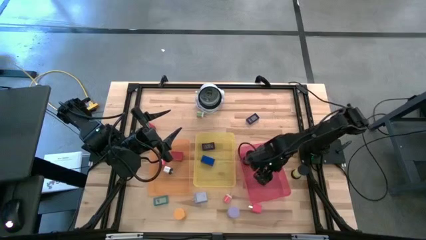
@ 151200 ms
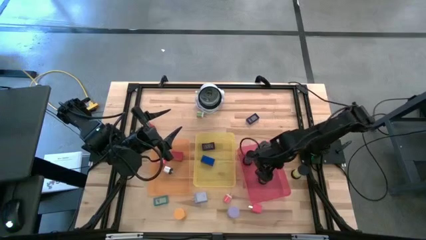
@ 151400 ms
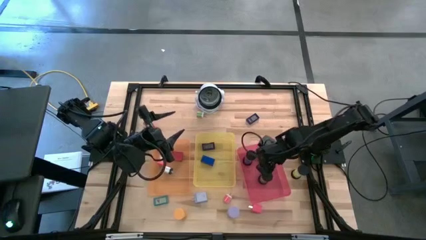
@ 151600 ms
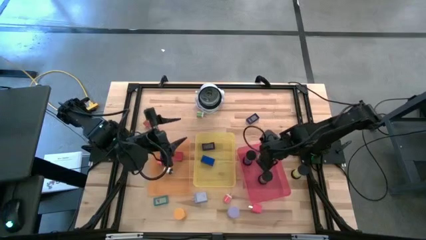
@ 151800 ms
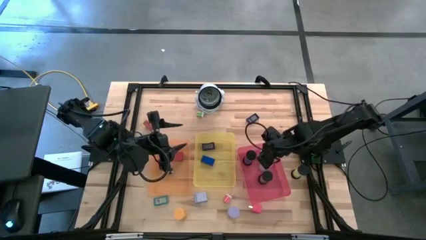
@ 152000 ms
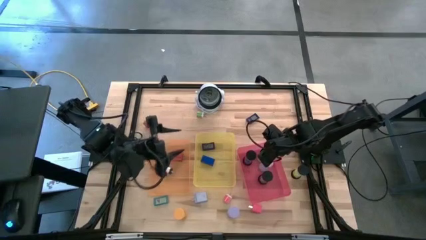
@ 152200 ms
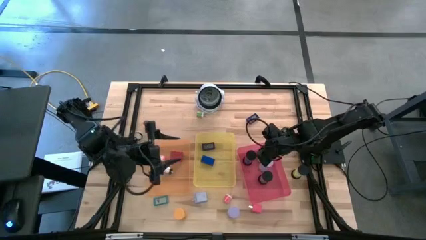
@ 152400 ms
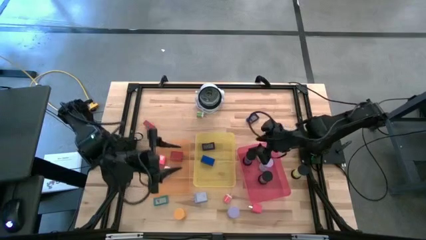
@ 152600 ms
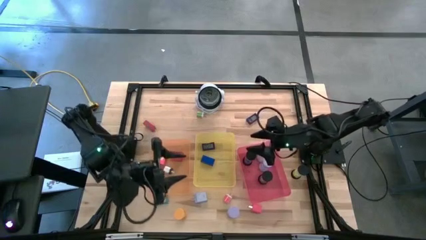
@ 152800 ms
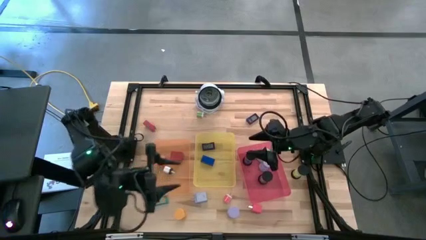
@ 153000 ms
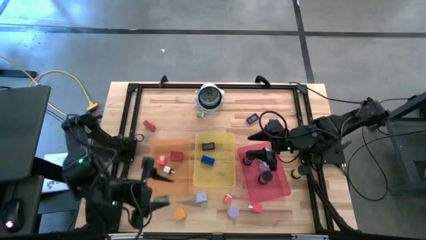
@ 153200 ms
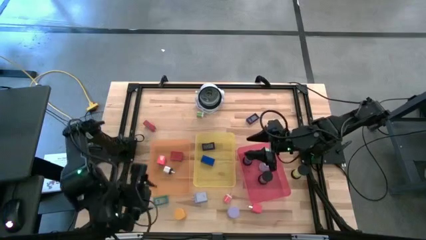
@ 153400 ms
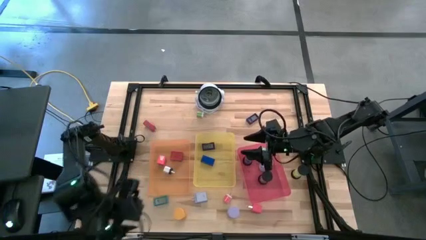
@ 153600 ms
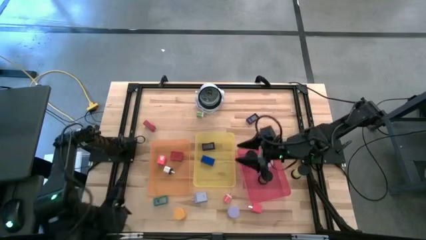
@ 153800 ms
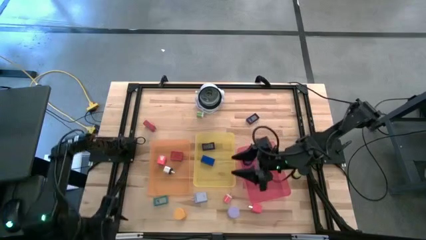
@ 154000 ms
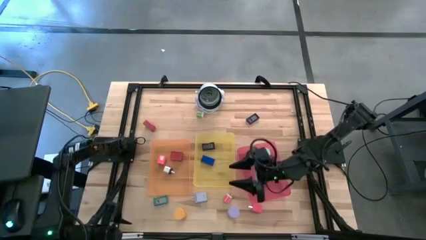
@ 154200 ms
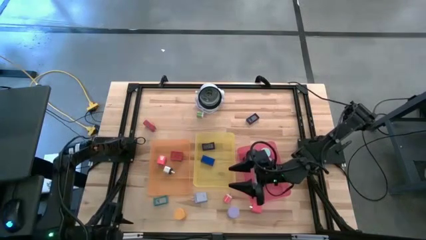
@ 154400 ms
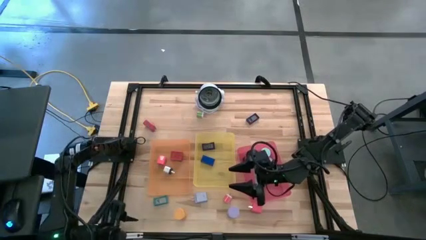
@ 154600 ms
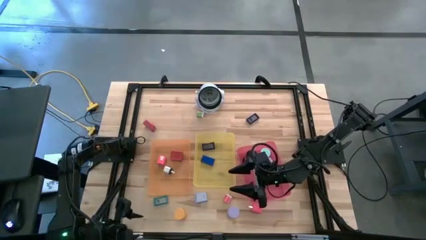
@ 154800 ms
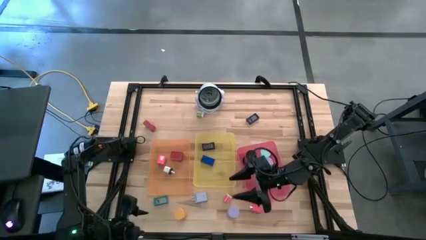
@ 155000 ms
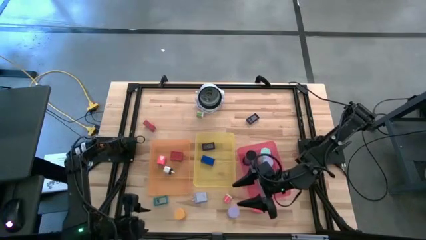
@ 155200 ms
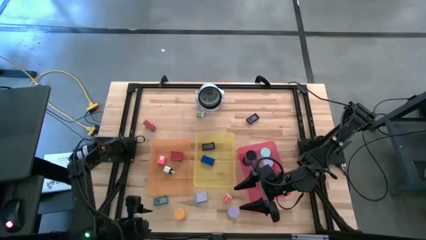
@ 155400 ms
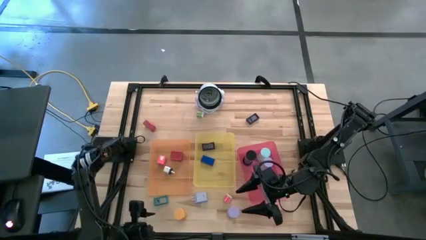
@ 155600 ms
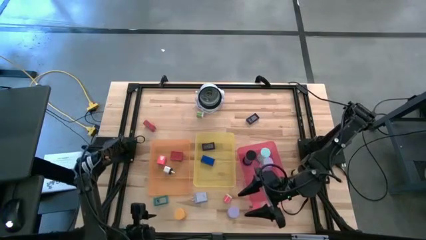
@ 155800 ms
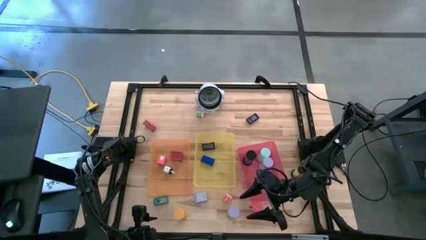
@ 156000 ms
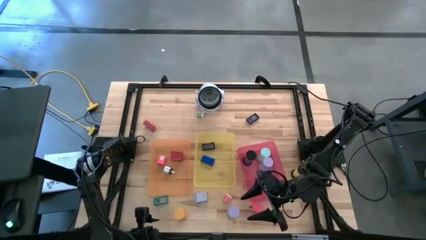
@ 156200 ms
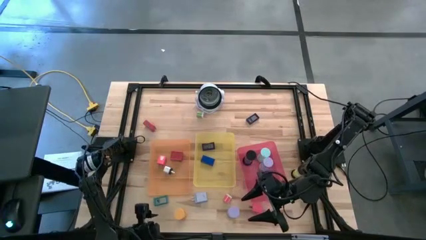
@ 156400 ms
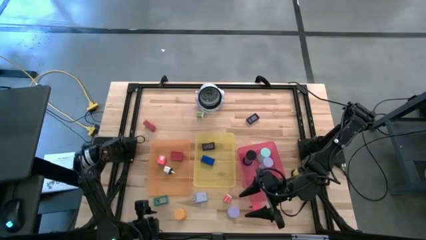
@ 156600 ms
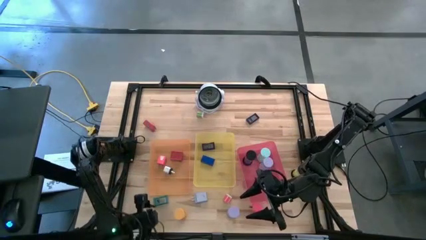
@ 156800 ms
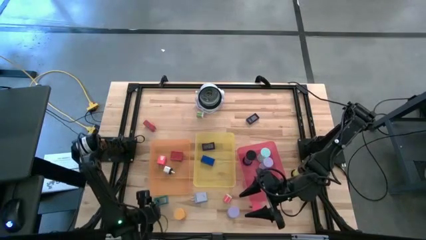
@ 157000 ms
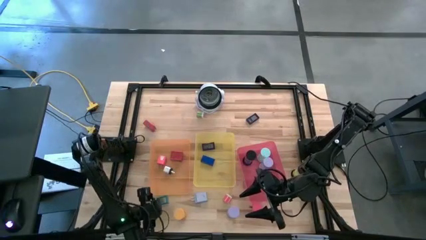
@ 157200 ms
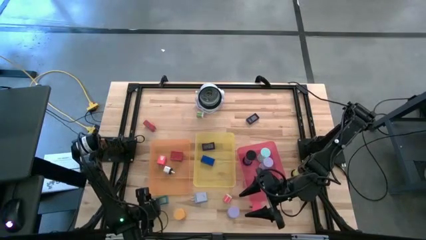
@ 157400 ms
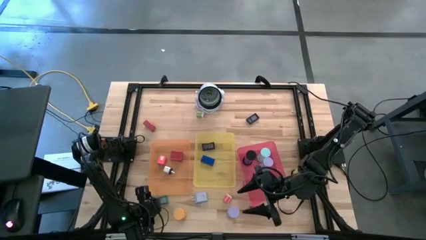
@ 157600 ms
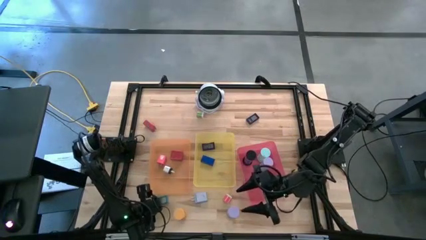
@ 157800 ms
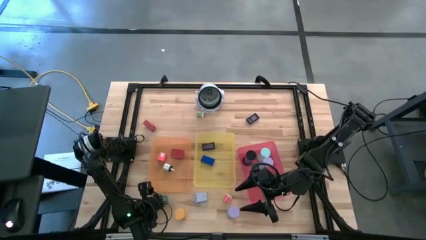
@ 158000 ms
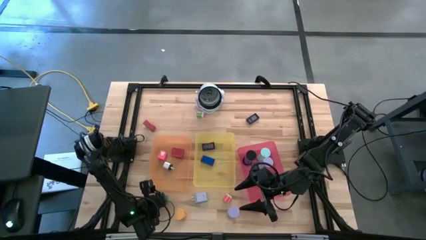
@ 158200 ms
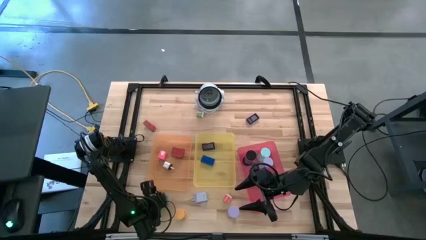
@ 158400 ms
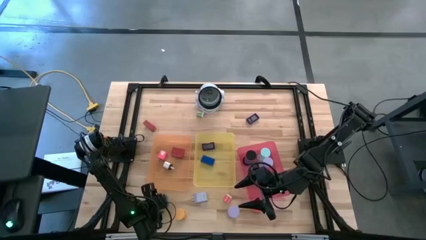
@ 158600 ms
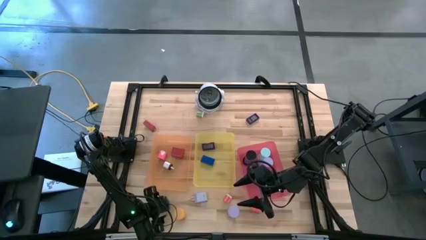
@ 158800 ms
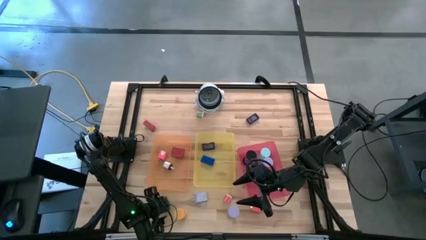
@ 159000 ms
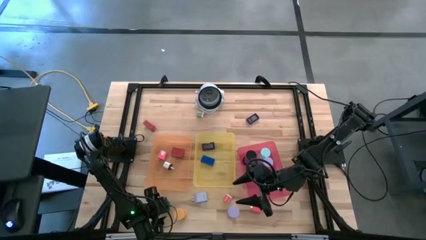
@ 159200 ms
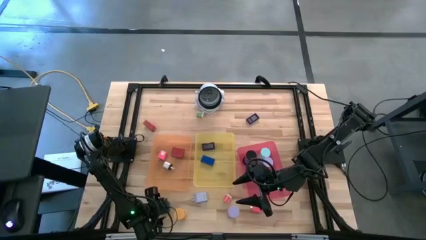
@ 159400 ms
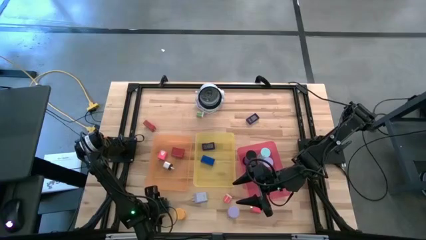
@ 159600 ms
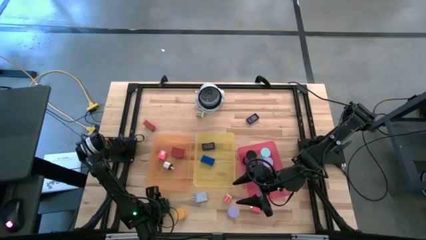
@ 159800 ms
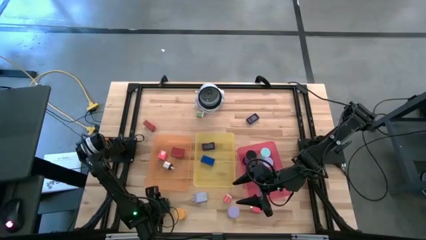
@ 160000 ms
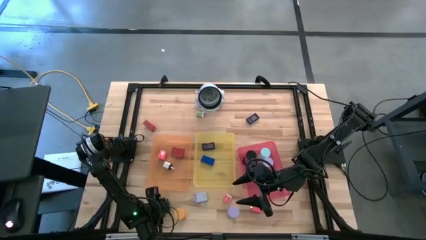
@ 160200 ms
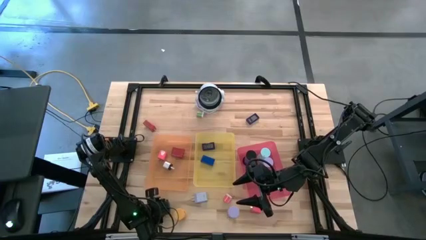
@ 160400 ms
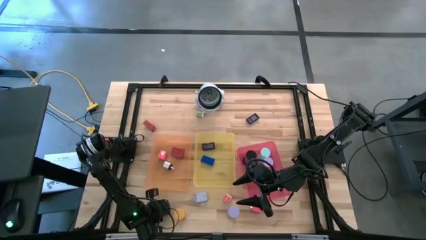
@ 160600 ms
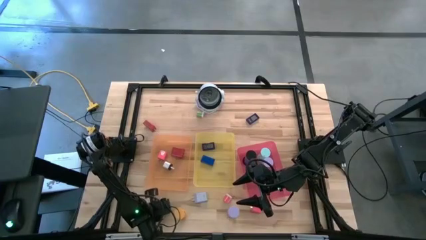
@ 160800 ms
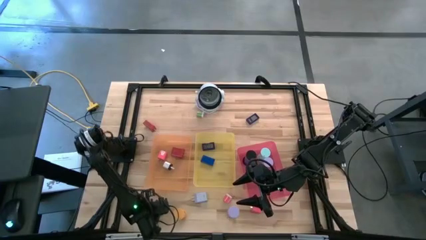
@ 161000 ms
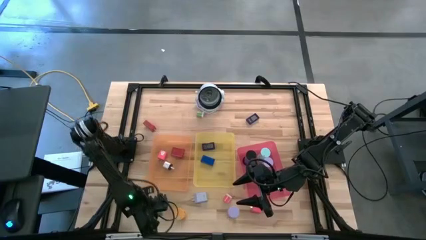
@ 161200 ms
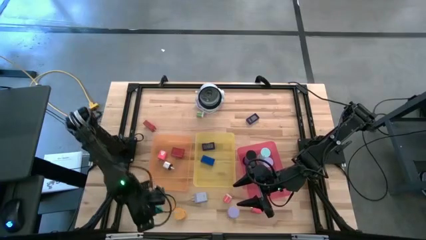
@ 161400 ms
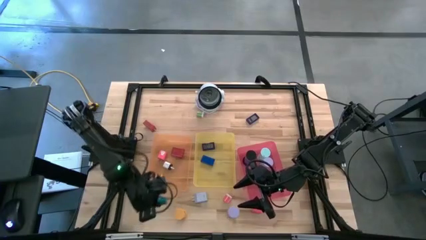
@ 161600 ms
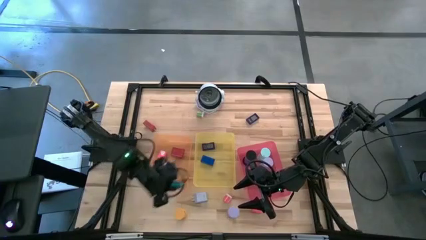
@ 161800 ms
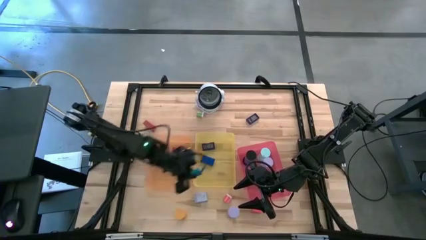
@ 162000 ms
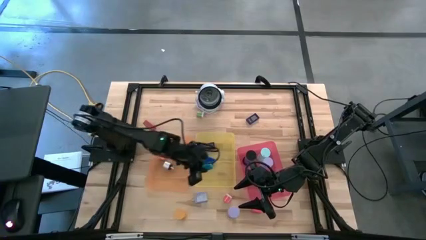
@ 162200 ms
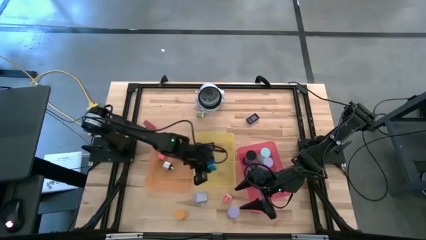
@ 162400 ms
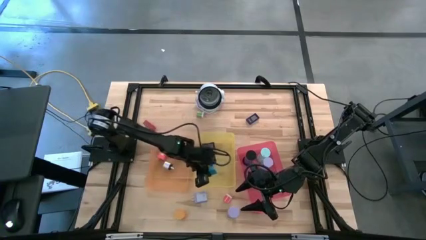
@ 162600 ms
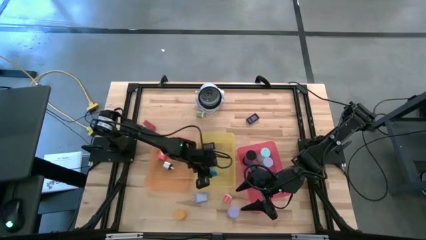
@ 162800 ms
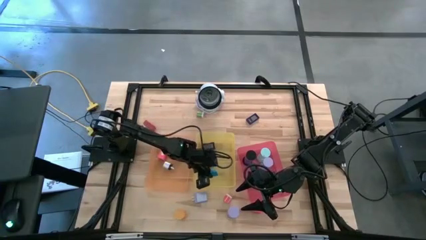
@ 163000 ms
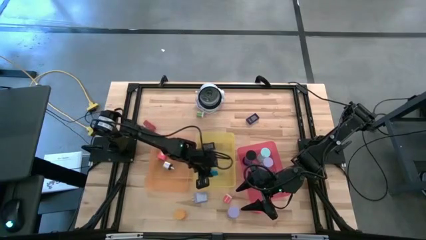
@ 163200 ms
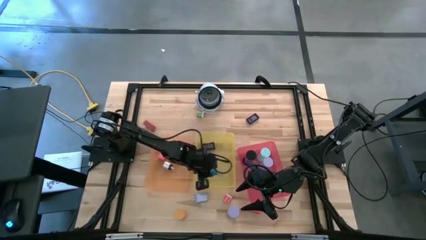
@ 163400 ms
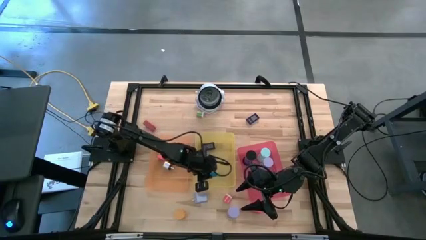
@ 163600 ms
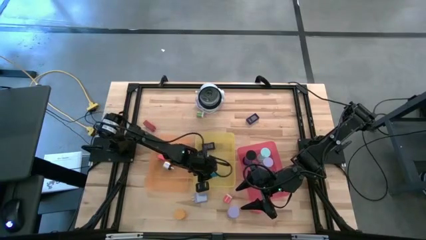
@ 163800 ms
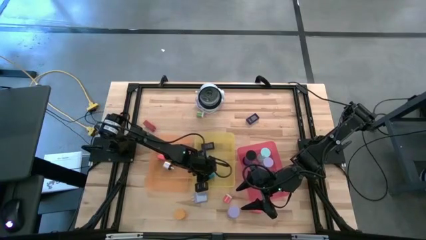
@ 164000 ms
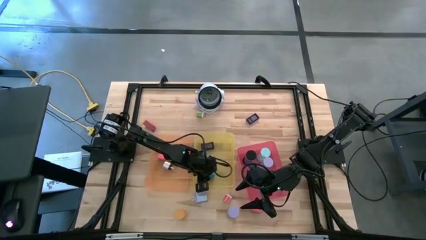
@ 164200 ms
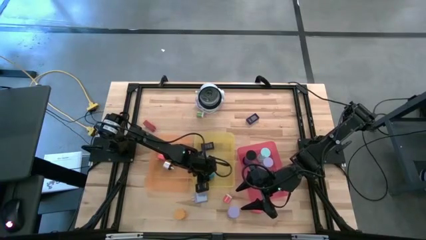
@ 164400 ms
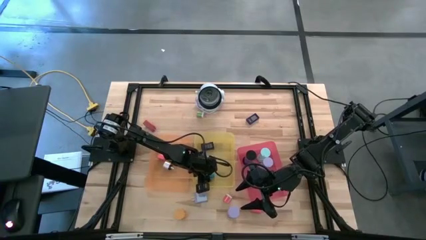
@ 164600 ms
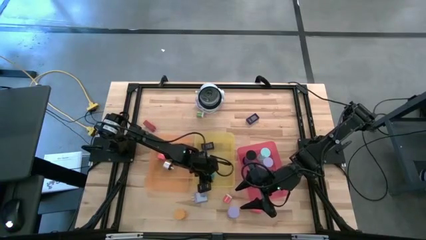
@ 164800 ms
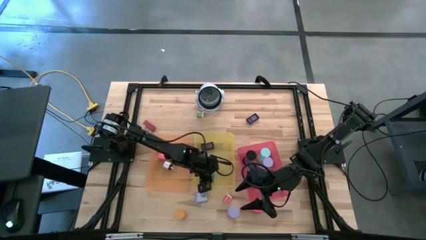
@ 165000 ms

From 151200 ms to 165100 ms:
Task: Pick & Place Office items
Put the light blue digital timer into the yellow bin
